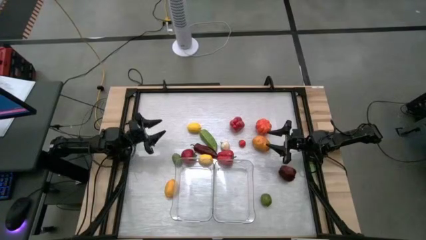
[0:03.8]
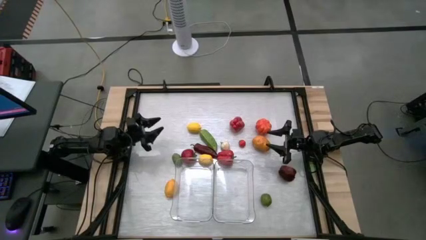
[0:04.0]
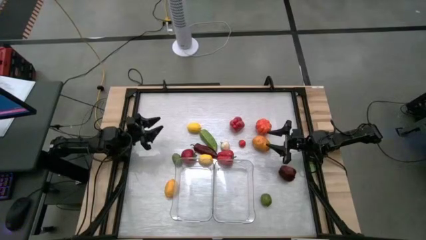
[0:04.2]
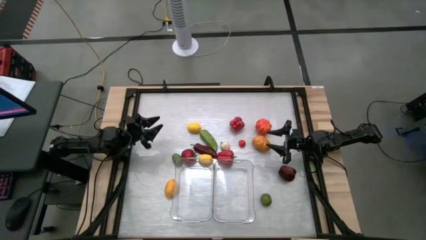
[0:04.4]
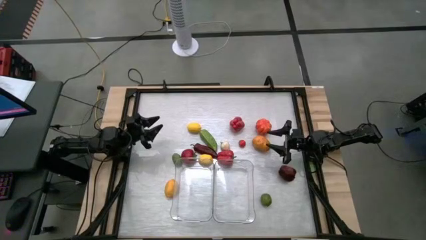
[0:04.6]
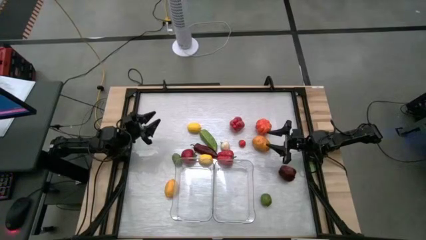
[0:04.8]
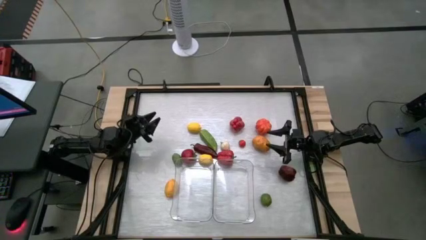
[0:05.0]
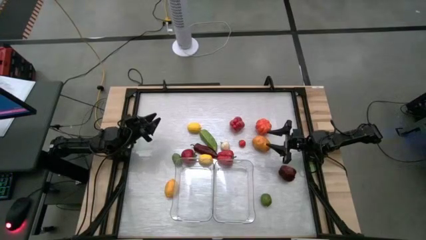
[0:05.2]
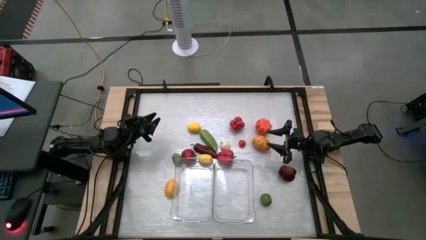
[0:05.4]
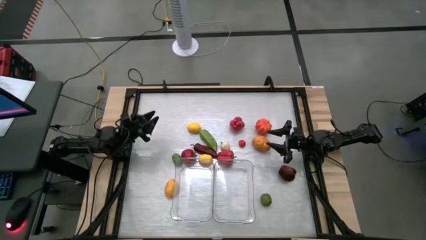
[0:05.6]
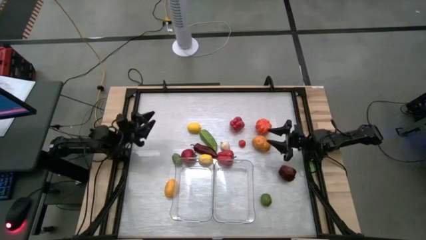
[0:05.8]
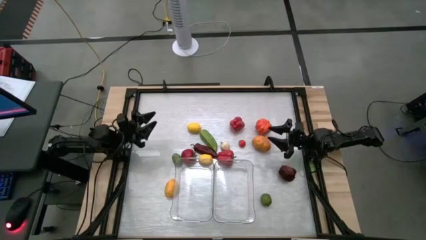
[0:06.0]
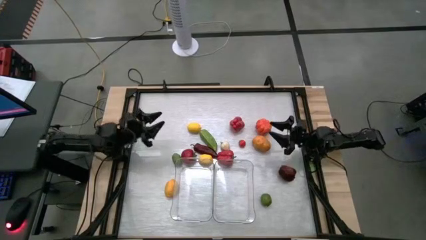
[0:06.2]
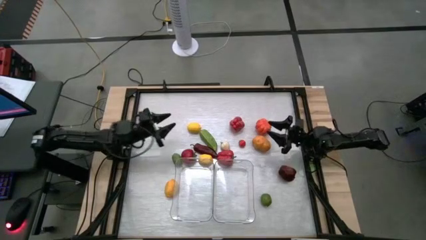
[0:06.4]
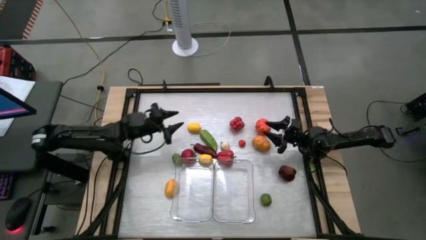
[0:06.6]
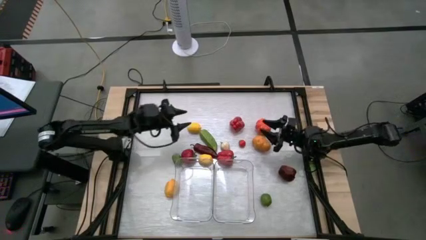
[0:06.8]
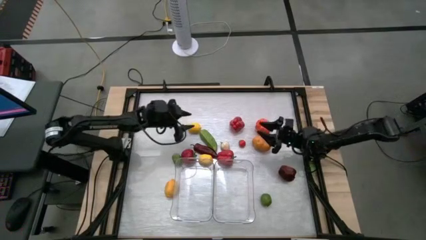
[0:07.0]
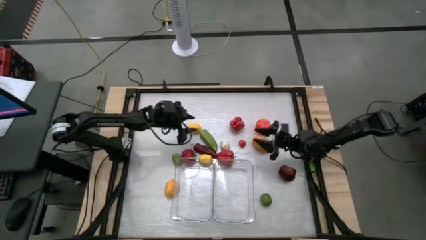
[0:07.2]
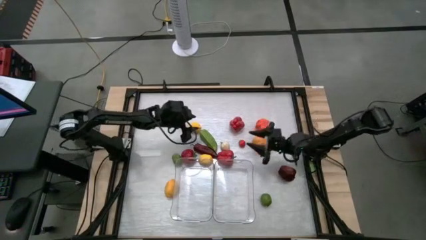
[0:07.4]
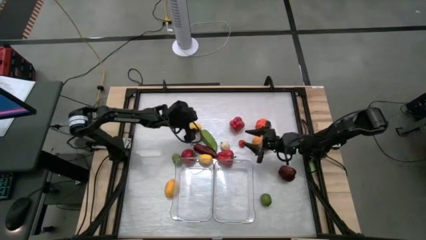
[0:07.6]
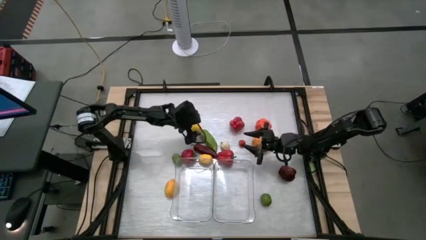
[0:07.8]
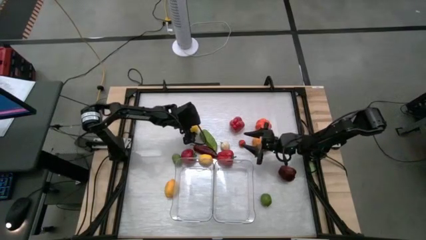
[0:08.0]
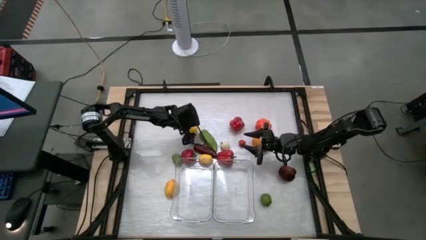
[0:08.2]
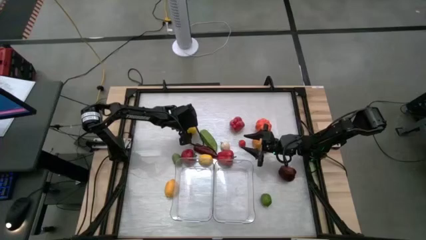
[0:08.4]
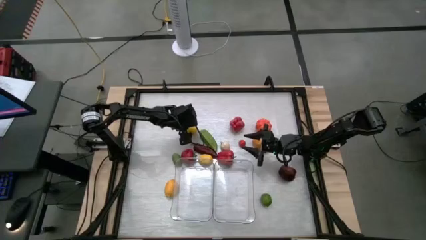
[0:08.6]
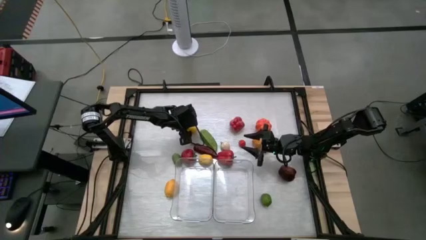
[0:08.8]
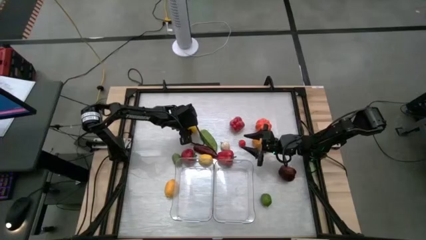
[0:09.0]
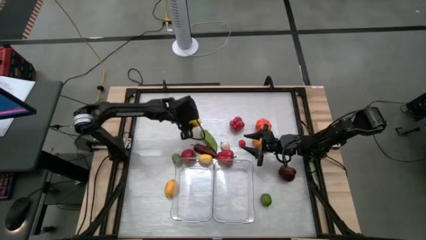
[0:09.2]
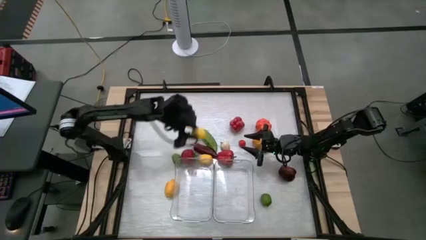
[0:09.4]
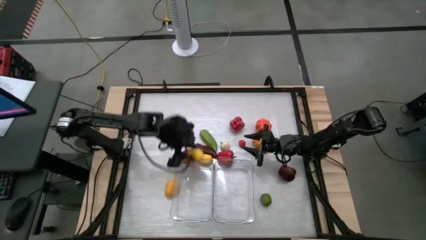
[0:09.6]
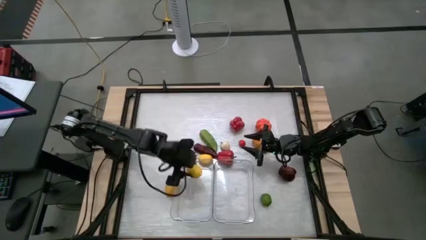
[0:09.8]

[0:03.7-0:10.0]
Task: Sort produce into baskets
Put the top lemon into the left transparent bin

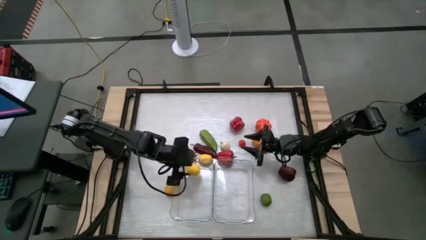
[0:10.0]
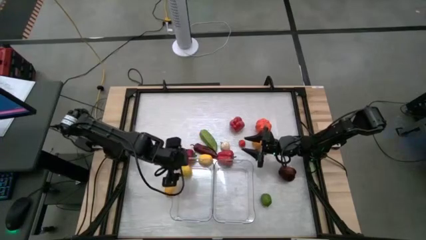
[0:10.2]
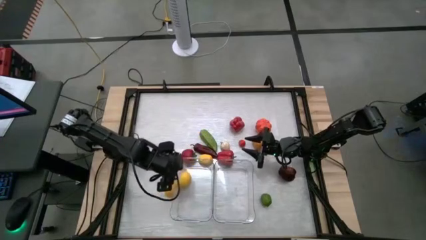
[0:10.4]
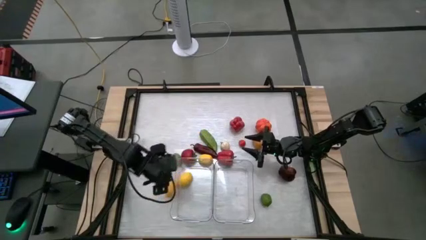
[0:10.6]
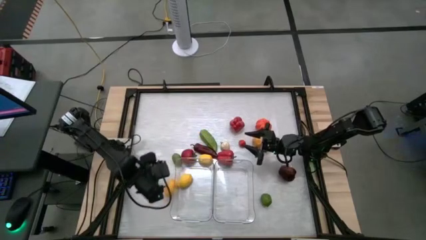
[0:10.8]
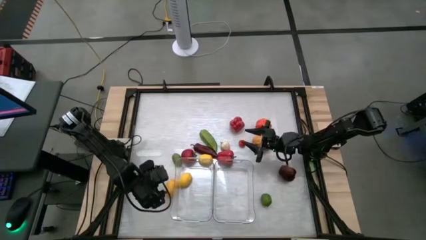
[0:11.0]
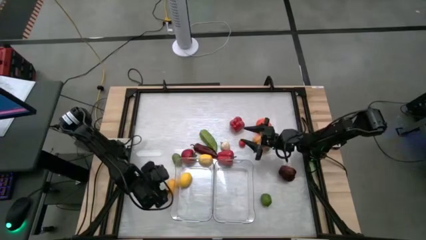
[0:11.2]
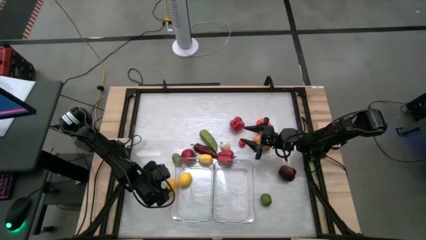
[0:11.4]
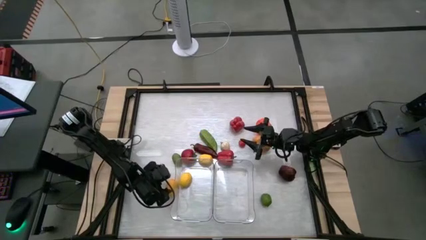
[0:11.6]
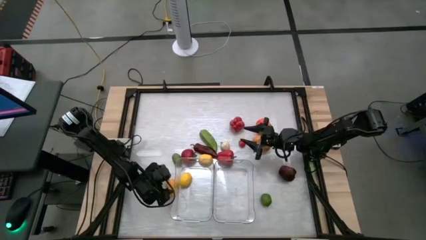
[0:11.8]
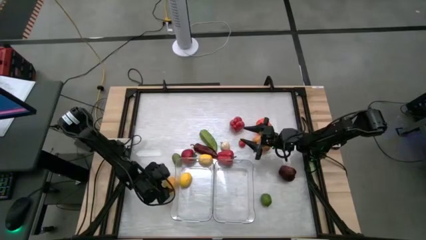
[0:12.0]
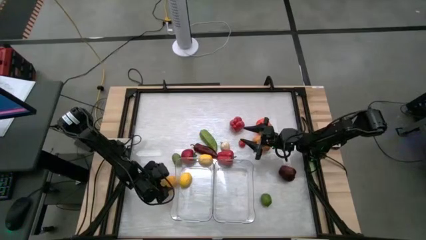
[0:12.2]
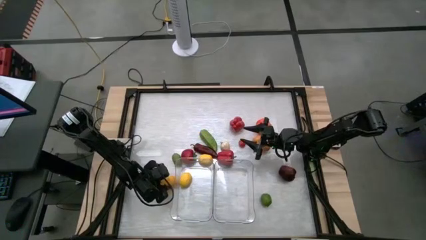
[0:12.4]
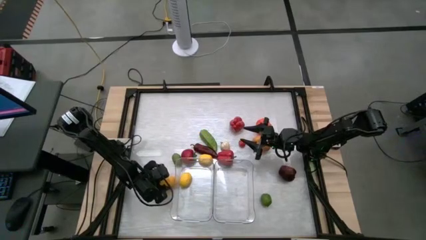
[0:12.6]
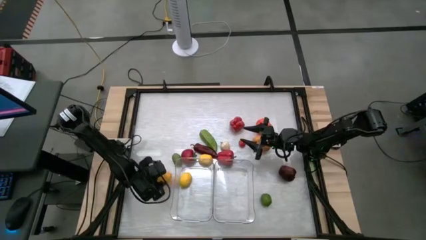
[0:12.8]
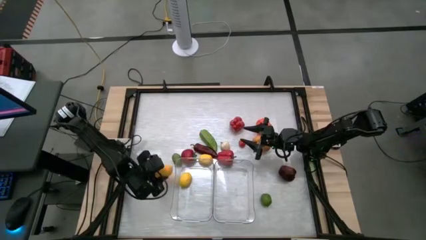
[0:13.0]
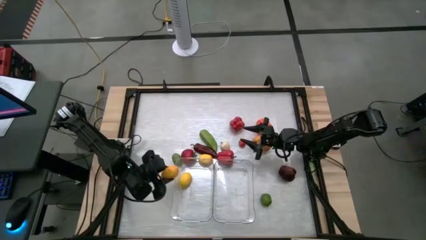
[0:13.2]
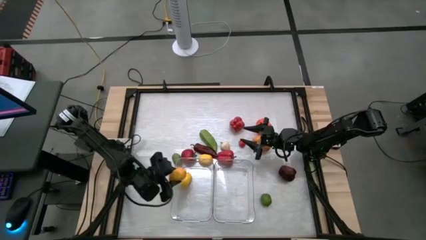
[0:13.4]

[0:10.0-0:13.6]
Put the bottom lemon into the left transparent bin

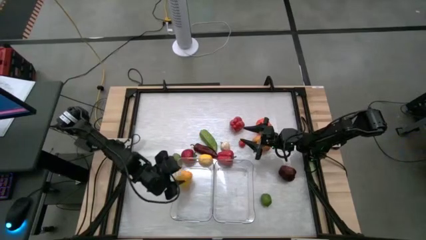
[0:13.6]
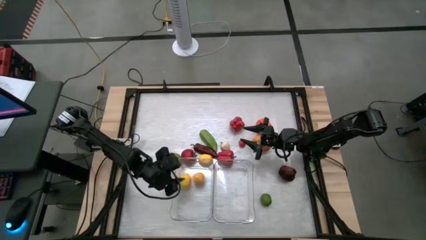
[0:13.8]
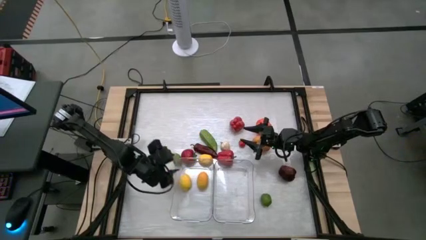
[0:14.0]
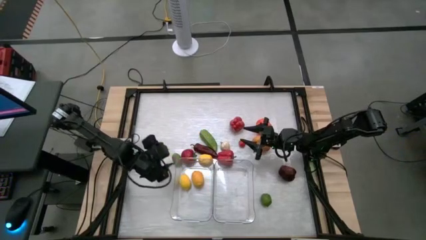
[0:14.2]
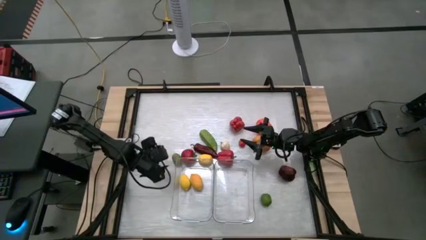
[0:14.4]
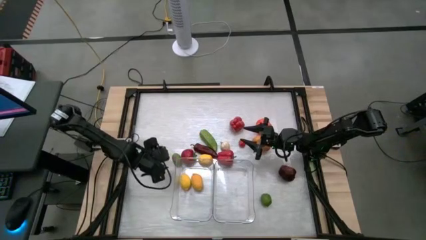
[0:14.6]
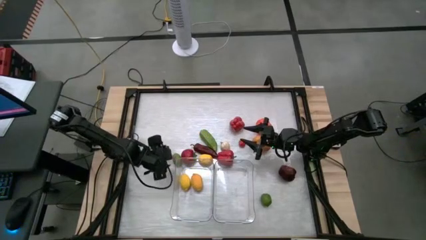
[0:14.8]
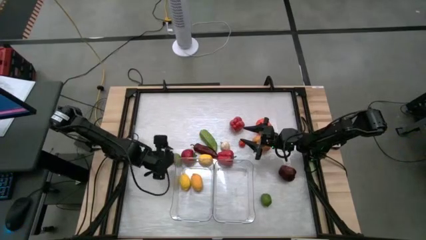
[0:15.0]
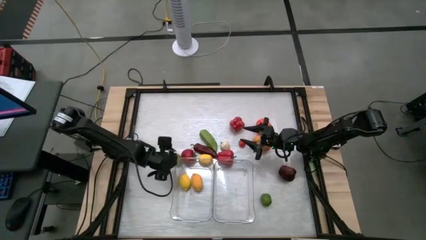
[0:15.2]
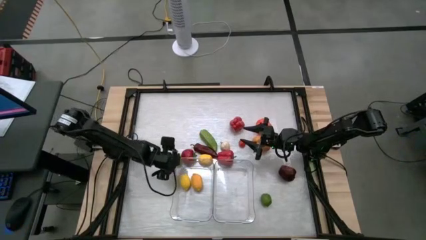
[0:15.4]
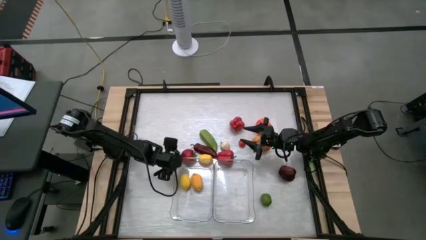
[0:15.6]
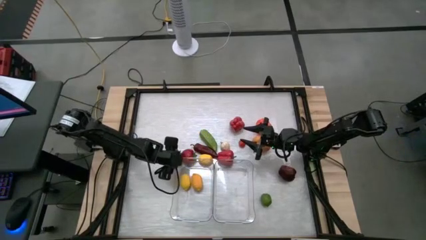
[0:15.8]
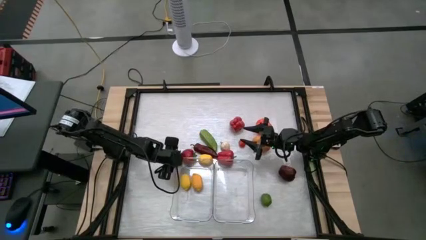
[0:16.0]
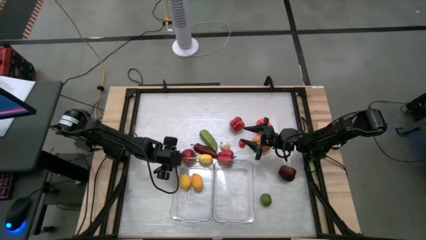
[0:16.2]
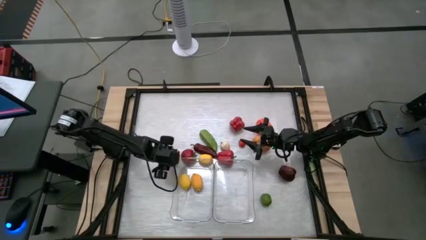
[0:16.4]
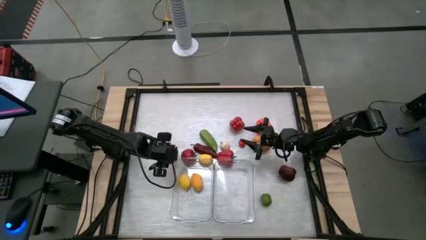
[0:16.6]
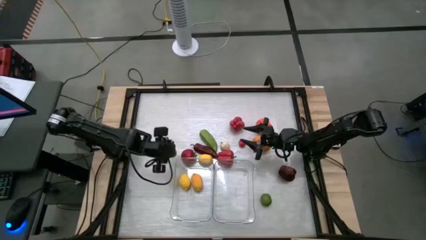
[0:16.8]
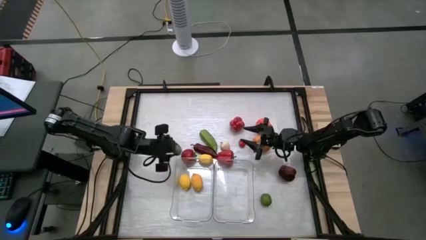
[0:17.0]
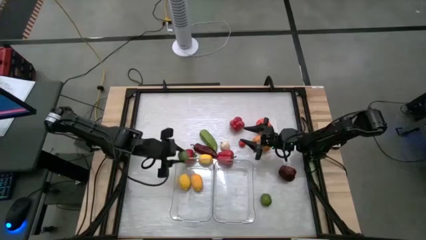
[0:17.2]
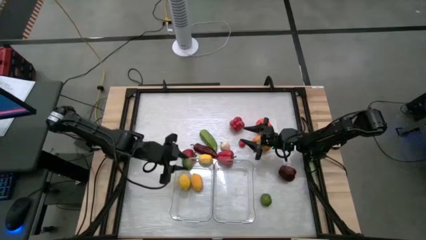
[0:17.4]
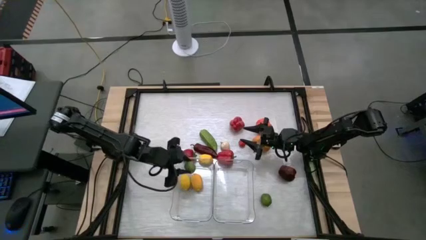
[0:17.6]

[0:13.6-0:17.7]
Put the top lime into the left transparent bin

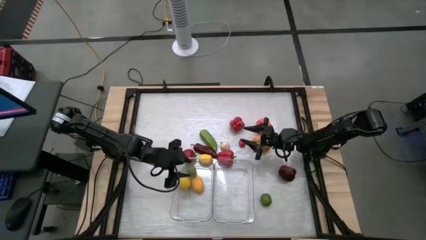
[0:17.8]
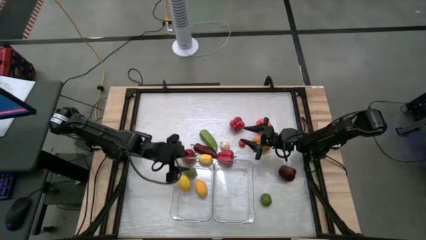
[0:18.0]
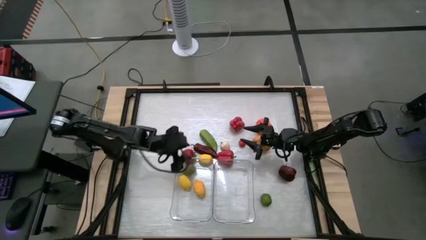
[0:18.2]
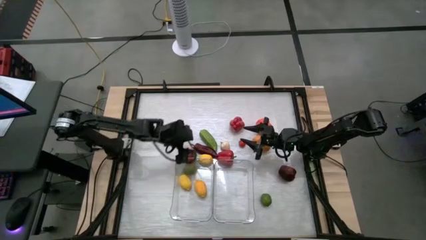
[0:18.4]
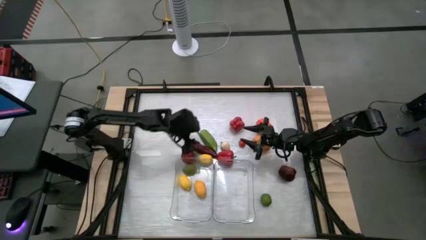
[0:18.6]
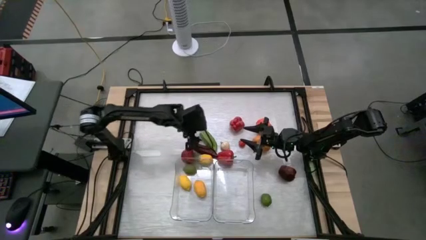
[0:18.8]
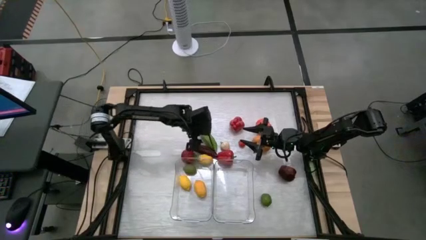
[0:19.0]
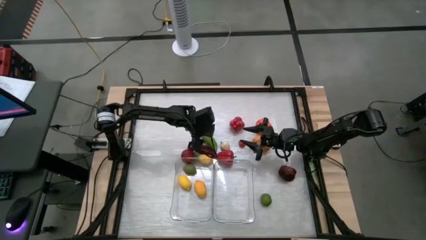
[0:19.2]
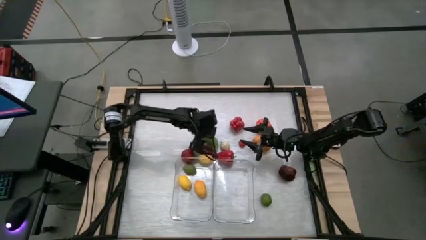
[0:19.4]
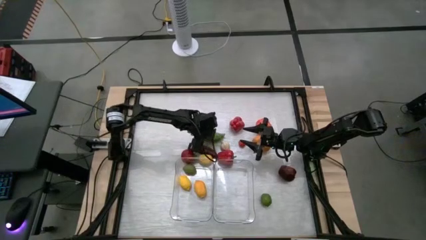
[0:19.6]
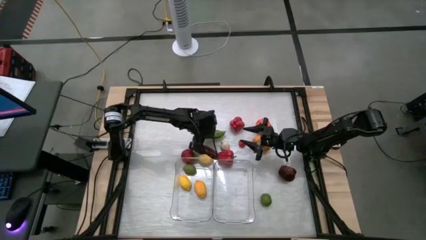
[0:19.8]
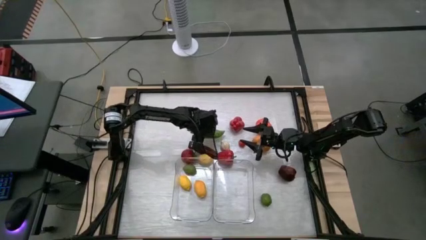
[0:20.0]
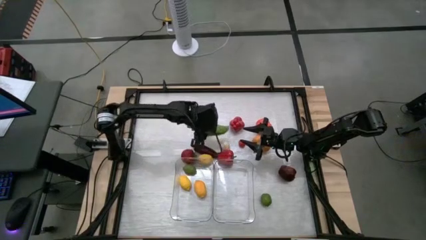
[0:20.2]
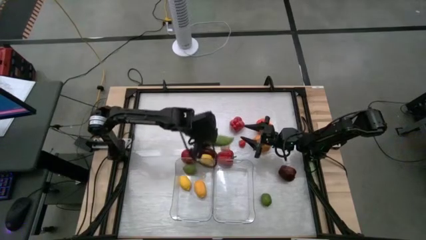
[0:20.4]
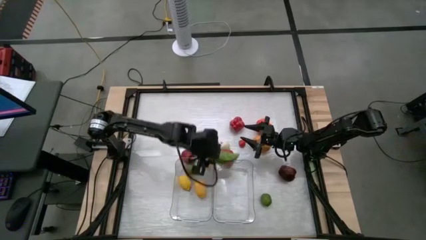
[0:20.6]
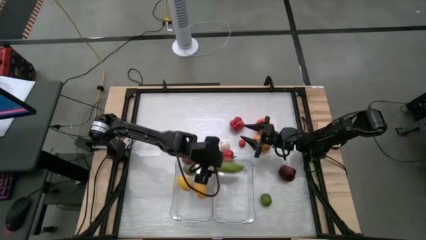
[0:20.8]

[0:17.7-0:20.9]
Put the cucumber into the right transparent bin
